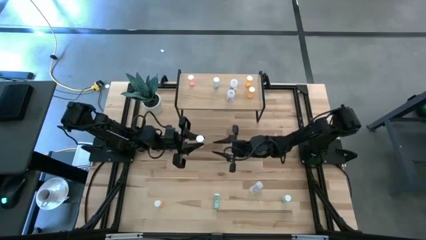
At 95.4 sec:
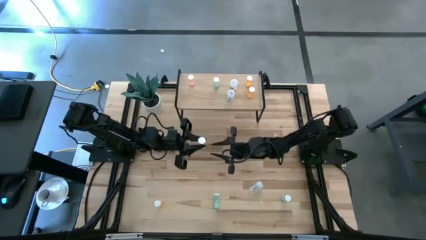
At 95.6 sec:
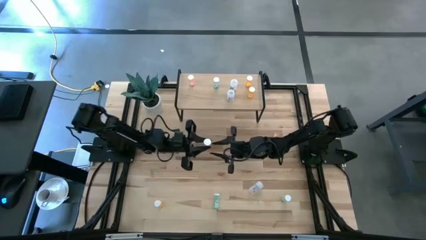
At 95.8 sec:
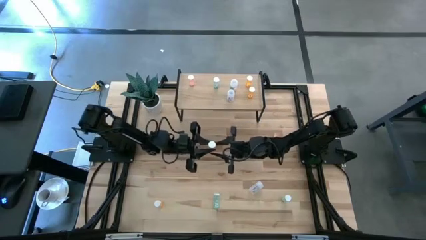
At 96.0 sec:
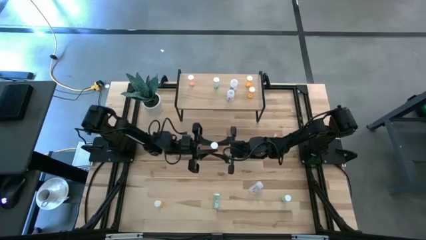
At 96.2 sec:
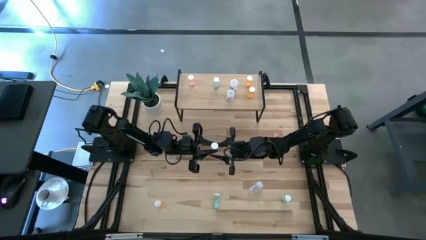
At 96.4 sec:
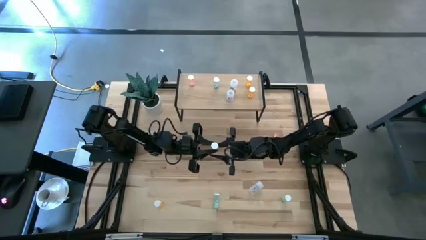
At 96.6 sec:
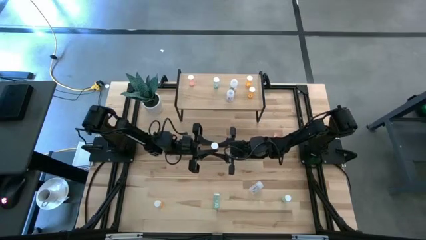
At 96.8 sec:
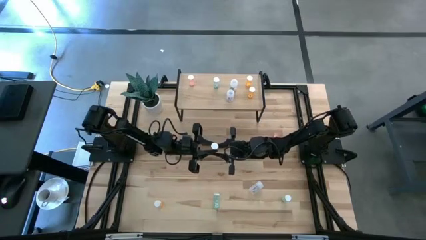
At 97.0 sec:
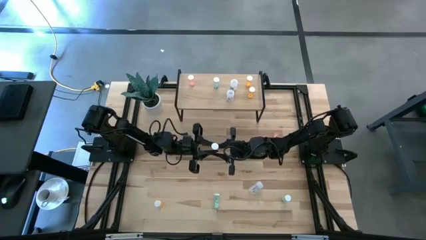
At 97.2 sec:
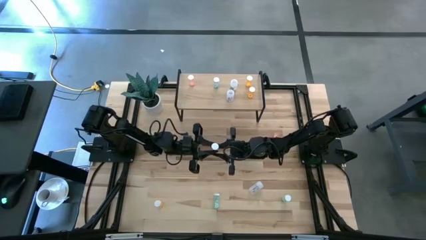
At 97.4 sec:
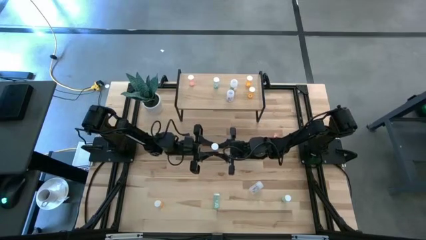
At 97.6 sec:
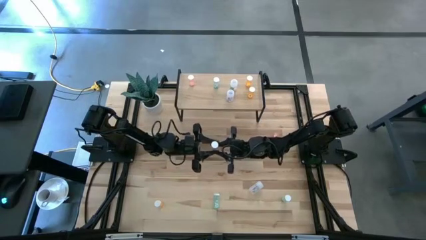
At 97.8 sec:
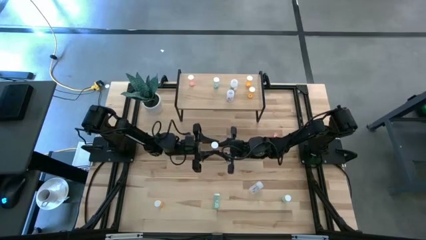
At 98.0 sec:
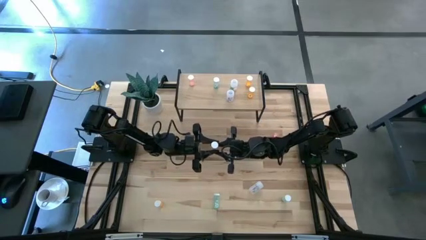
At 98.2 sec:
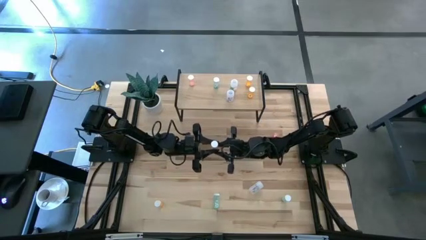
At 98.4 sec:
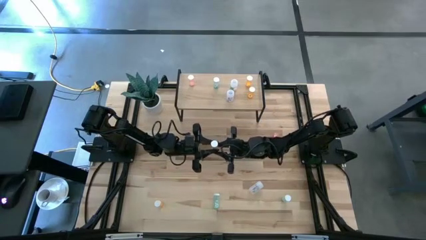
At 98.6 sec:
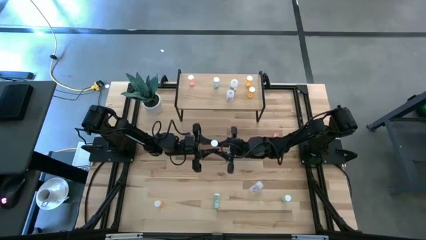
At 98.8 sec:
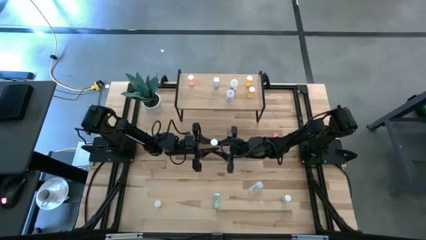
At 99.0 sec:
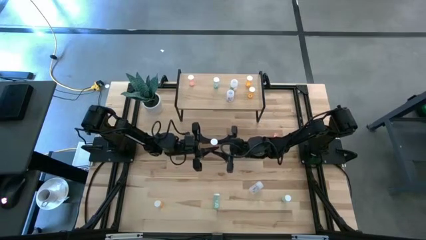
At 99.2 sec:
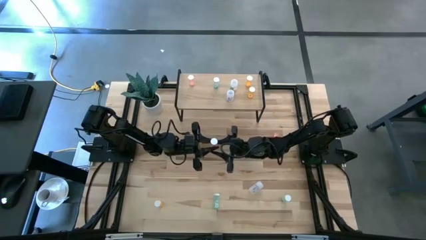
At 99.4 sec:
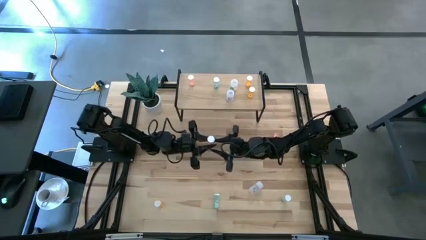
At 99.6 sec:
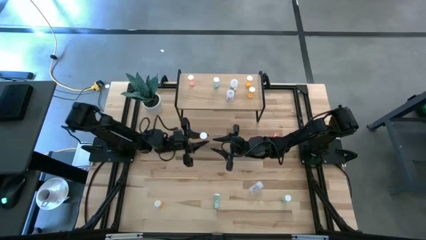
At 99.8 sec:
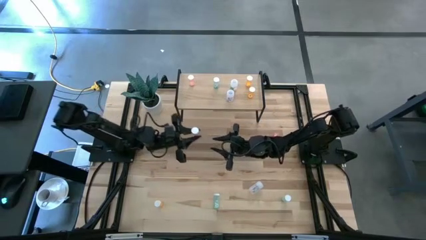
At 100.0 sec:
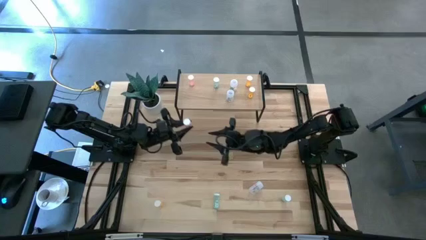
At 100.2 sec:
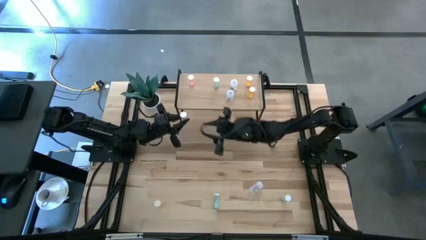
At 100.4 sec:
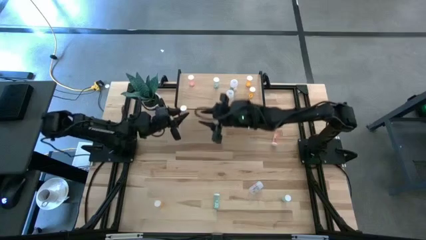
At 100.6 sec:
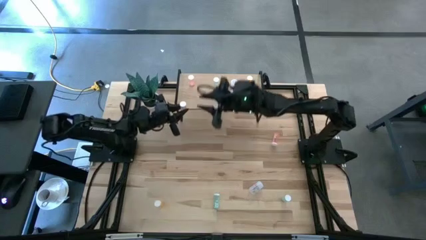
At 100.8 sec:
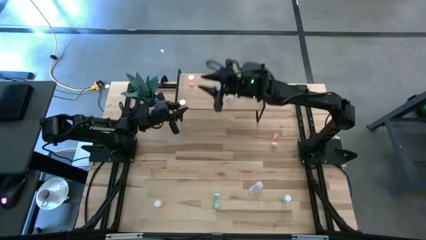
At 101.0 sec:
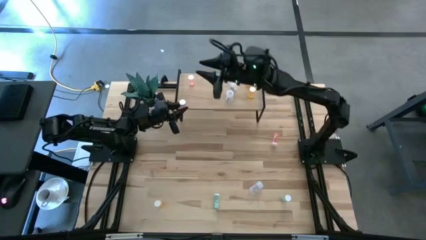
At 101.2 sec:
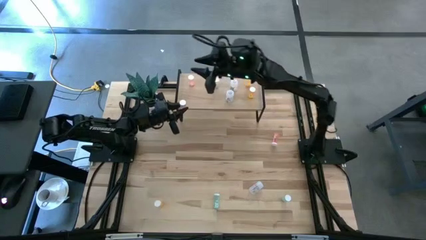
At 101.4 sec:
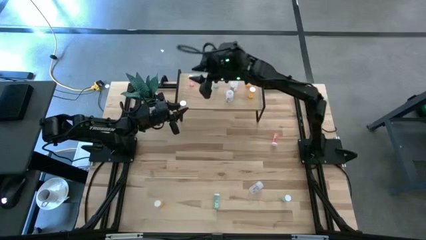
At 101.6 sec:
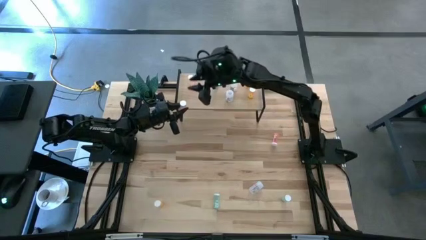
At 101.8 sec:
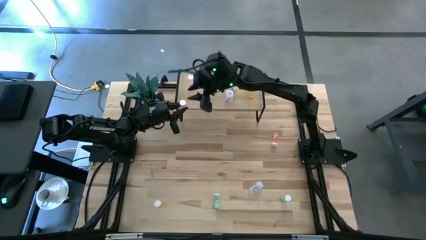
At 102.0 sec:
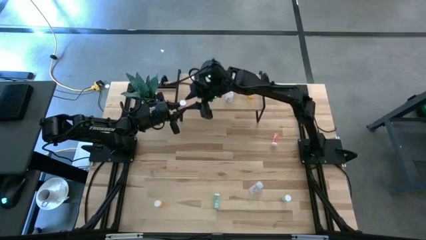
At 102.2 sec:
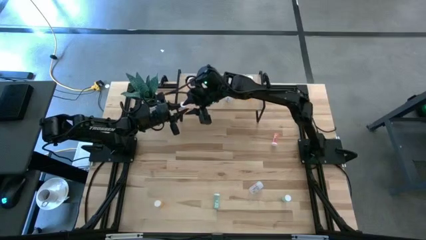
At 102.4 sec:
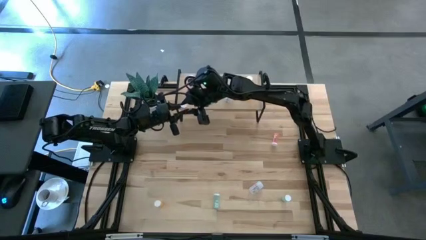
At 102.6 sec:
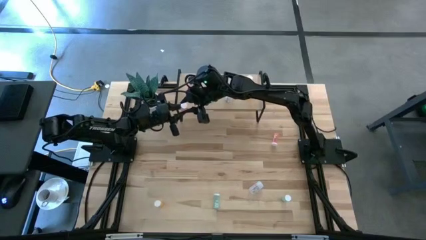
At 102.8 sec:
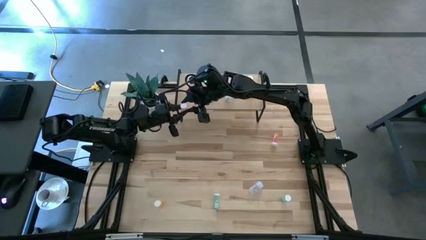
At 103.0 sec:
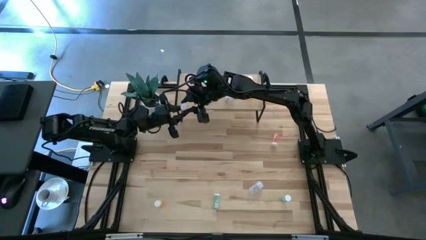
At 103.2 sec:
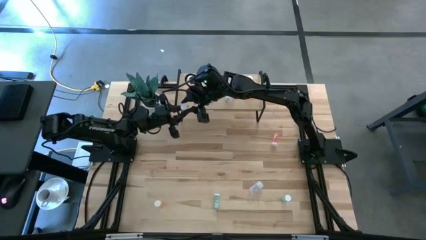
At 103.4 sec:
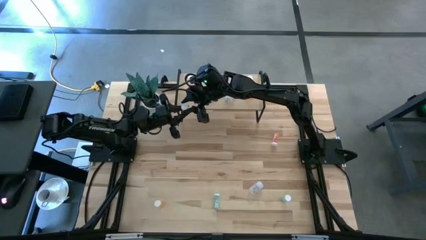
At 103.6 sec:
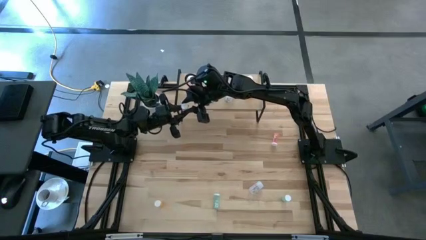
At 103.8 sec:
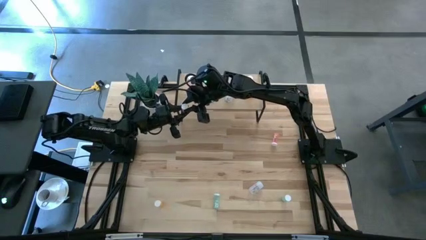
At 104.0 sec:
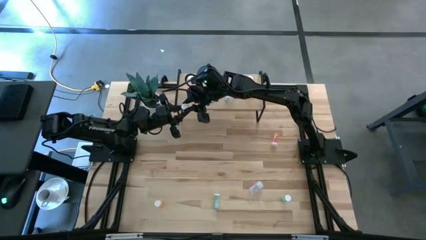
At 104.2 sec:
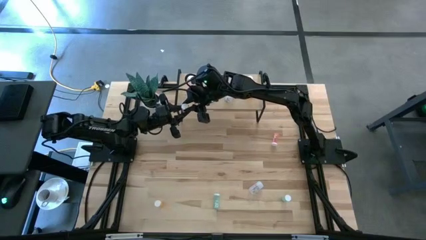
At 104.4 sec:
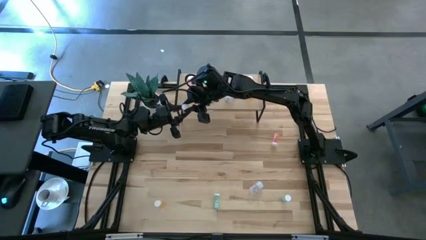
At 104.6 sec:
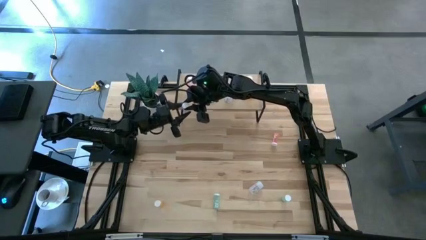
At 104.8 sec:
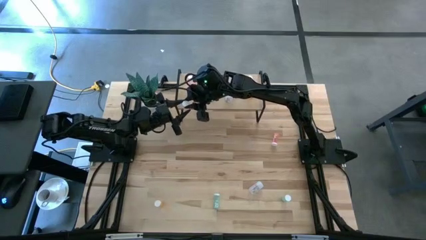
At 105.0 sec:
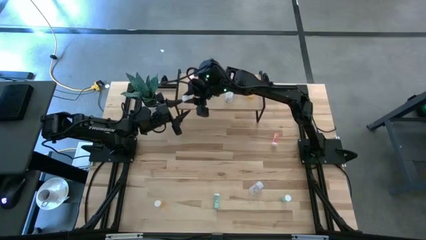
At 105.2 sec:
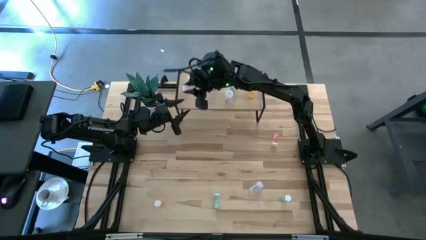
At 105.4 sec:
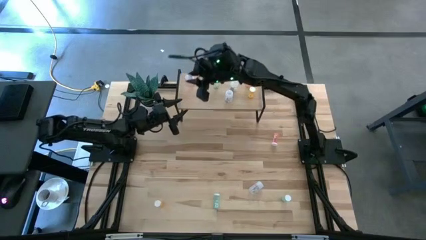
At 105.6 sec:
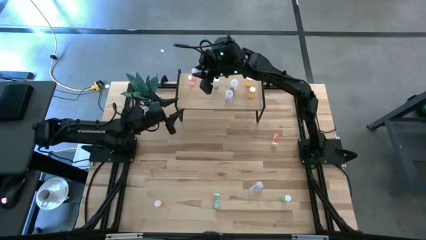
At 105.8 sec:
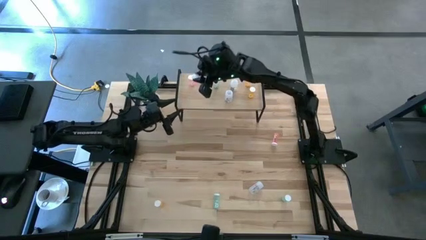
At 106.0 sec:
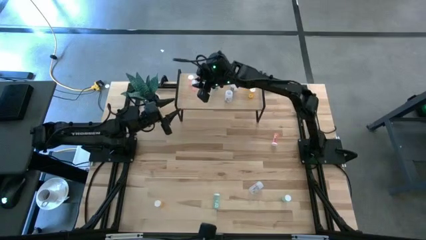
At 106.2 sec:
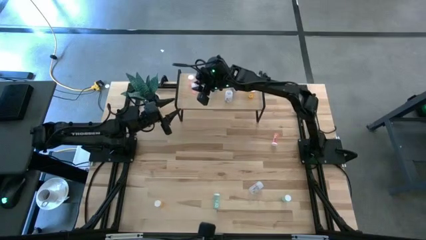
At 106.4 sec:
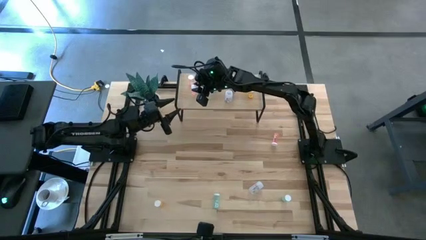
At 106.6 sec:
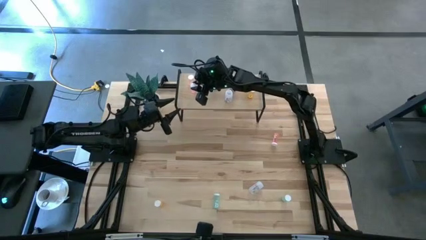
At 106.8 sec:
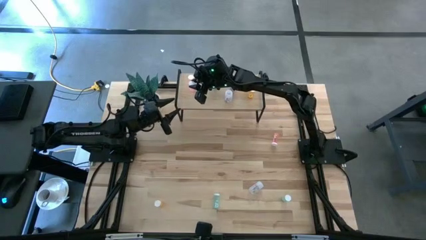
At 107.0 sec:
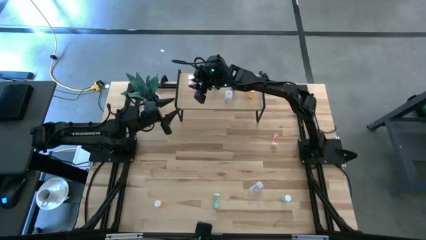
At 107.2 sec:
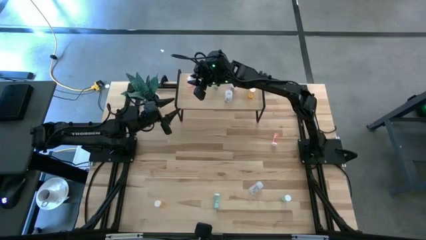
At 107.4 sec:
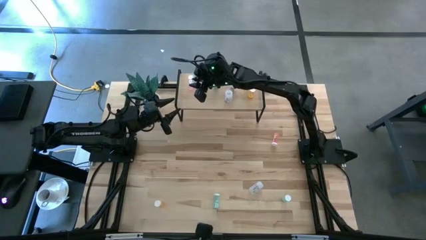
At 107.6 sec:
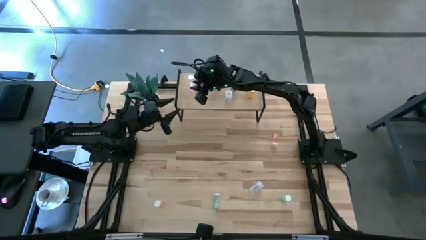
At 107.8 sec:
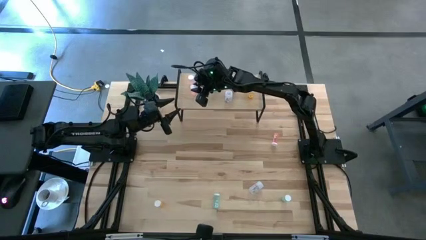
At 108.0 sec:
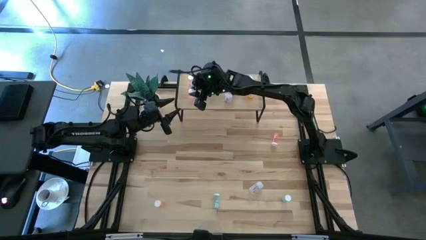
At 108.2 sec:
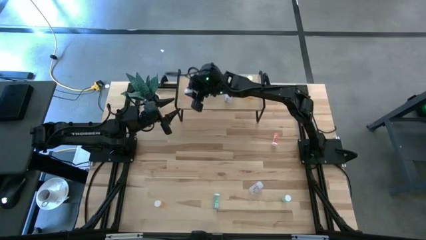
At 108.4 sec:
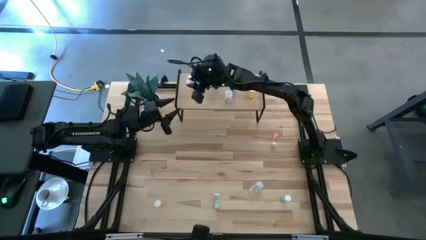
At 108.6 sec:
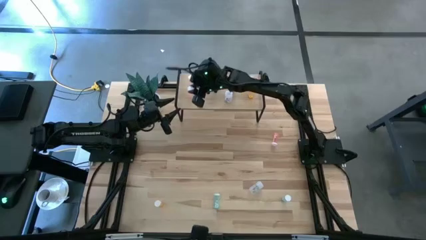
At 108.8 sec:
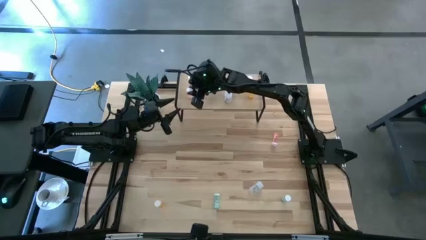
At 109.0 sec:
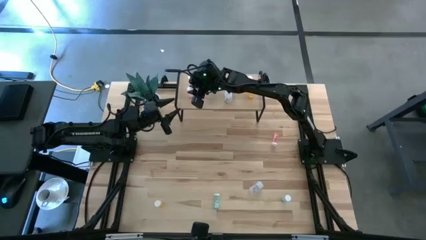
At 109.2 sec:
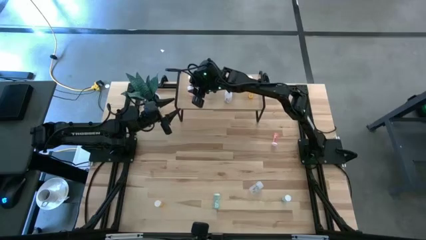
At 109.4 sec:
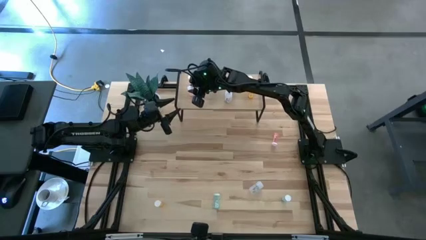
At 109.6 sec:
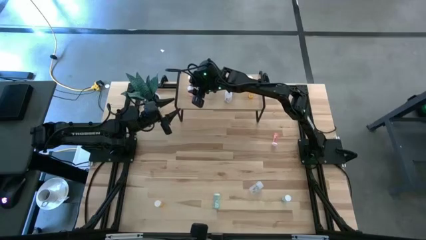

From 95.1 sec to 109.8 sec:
Task: Pick and place medicine bottles onto shelf by color
Put the bottom pink pill bottle aligned with the other pink pill bottle on the shelf

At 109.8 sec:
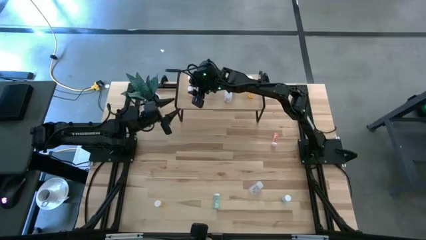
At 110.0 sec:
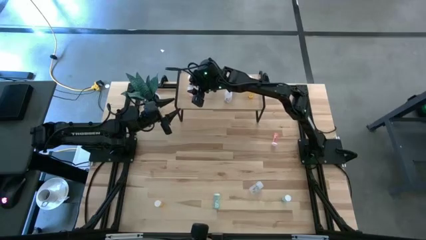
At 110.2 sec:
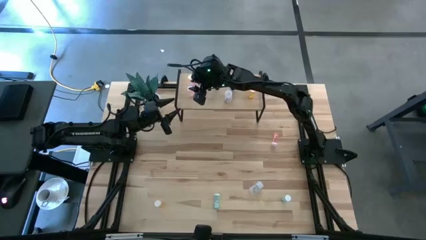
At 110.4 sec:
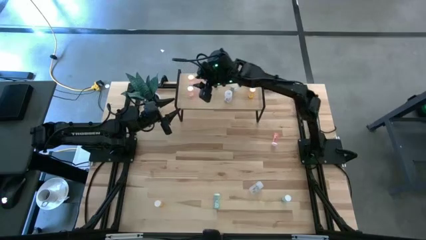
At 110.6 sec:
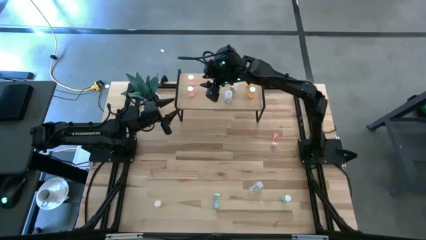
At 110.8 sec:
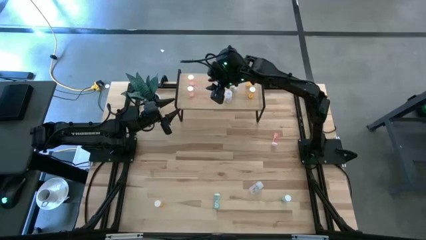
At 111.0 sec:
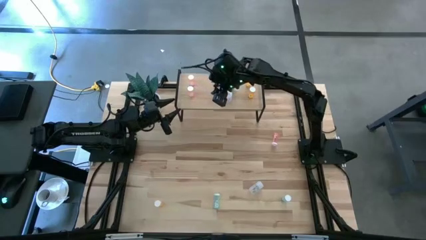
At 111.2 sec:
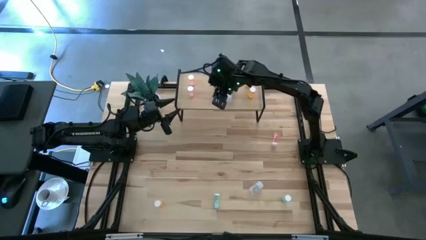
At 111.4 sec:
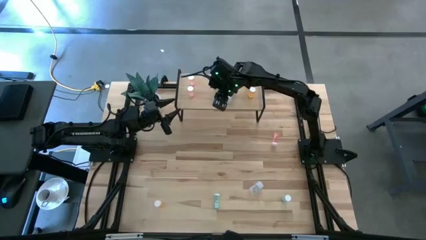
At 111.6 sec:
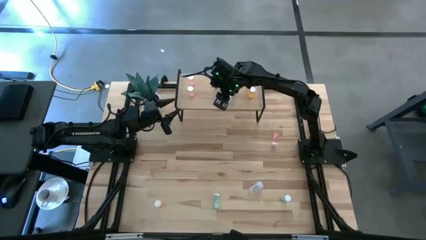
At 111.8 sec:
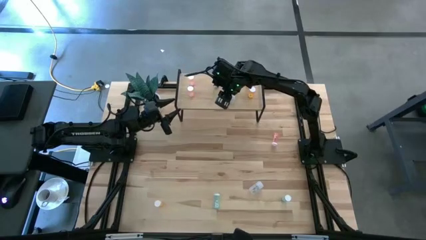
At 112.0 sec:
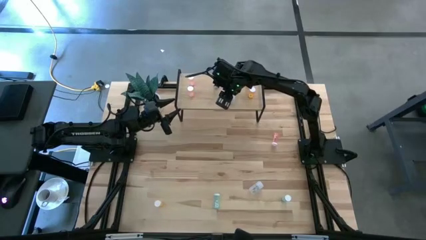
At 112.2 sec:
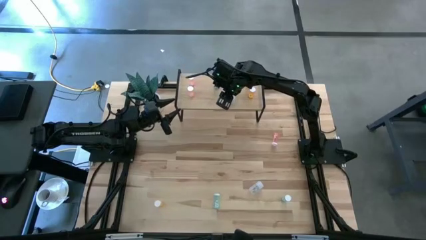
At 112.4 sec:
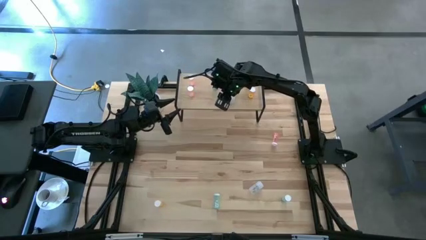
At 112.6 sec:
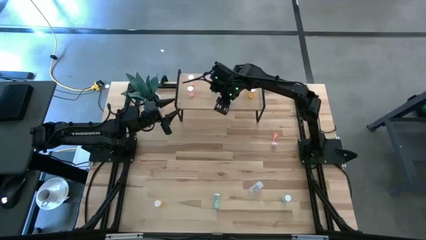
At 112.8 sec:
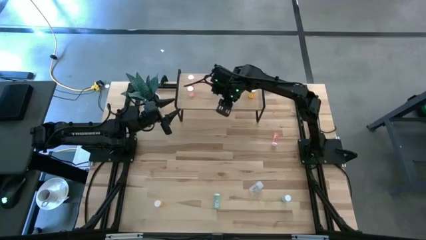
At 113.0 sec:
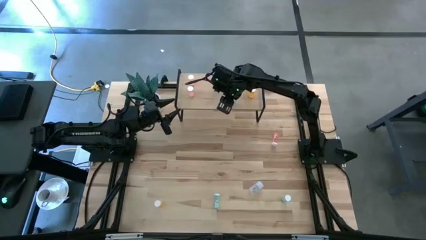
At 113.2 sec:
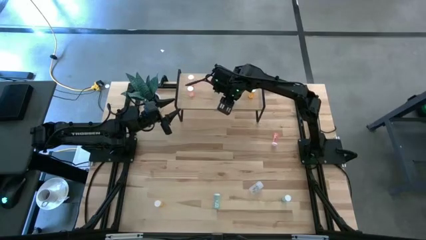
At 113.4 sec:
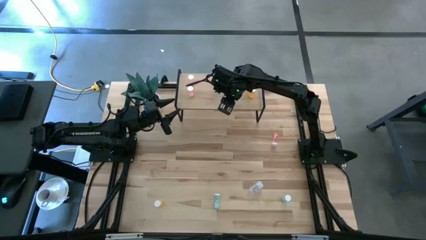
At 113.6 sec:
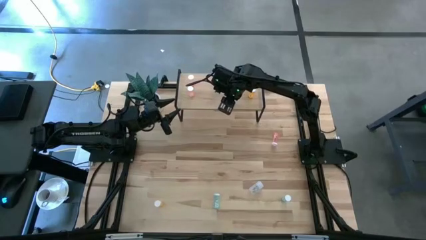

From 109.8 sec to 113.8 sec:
Adjust the bottom transparent pill bottle on the shelf
